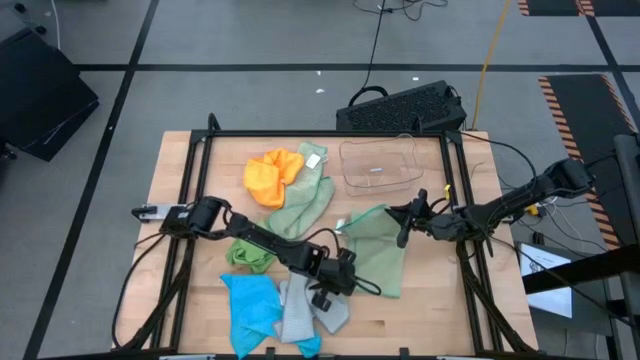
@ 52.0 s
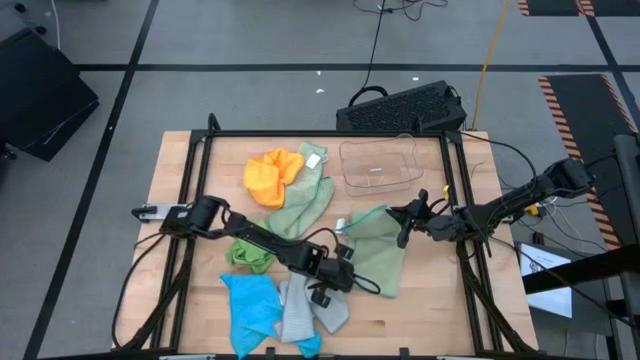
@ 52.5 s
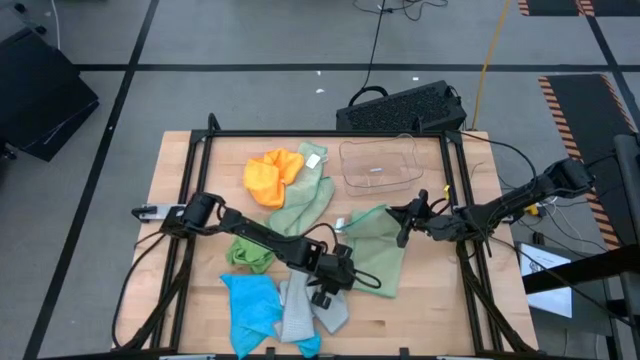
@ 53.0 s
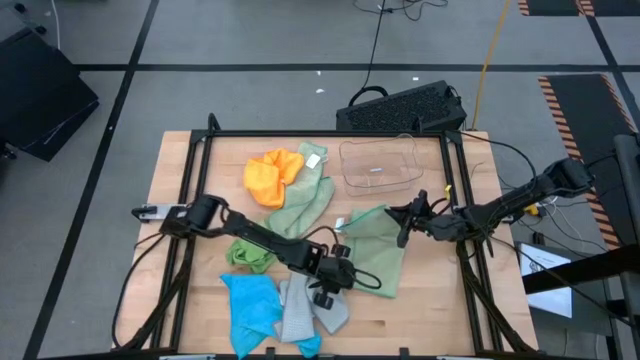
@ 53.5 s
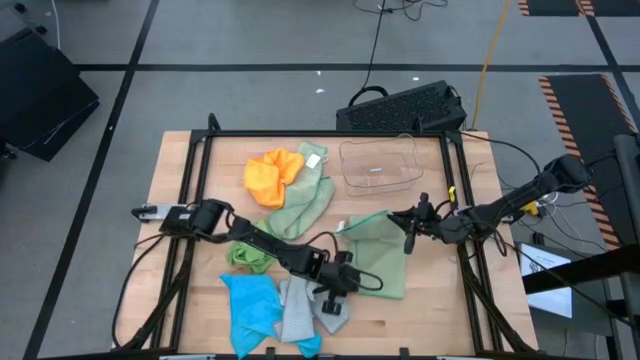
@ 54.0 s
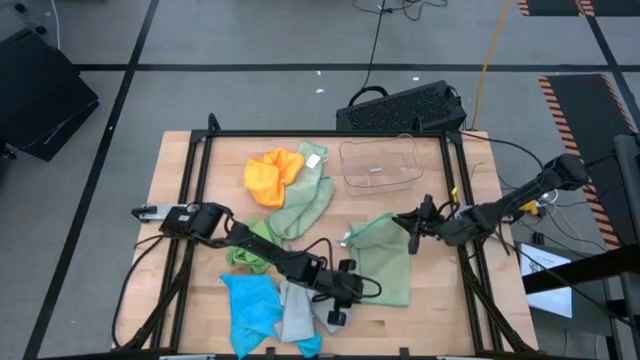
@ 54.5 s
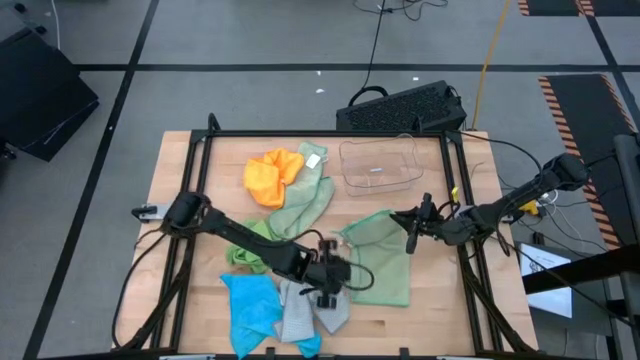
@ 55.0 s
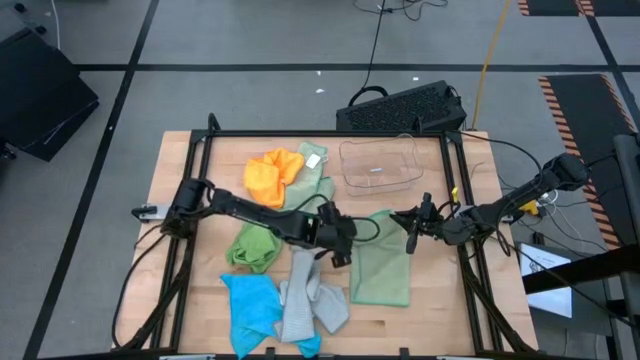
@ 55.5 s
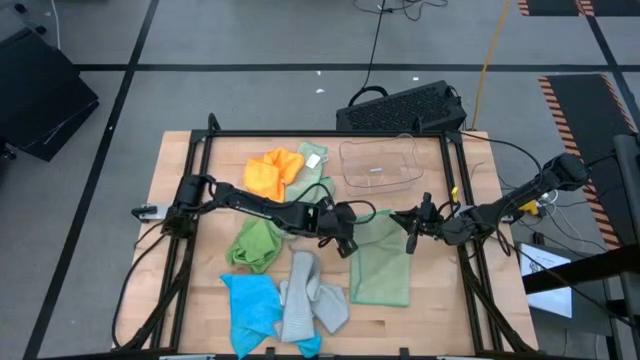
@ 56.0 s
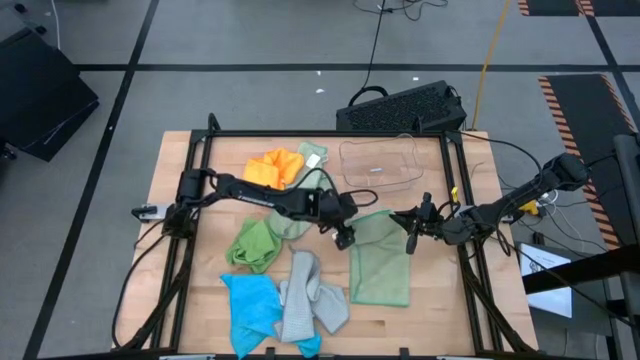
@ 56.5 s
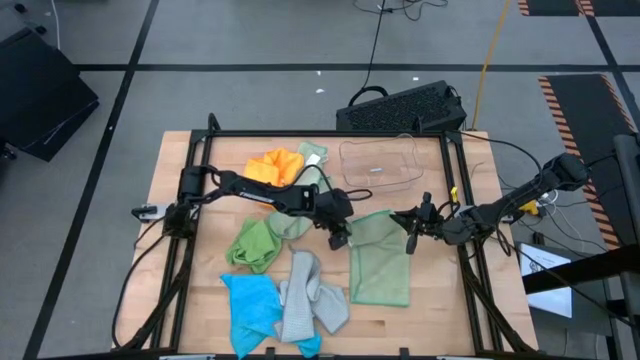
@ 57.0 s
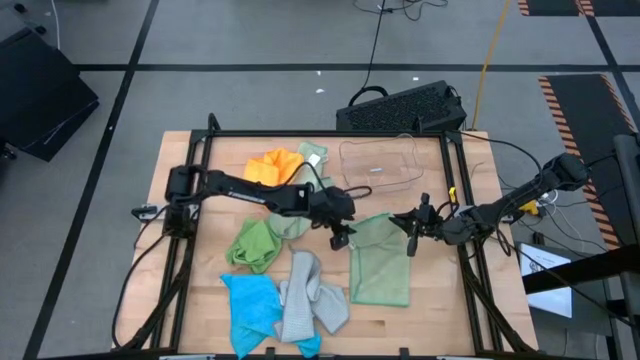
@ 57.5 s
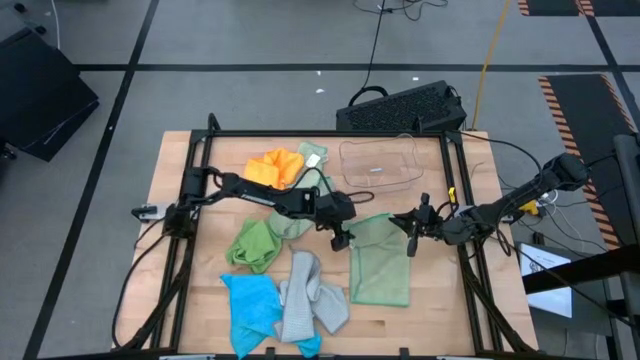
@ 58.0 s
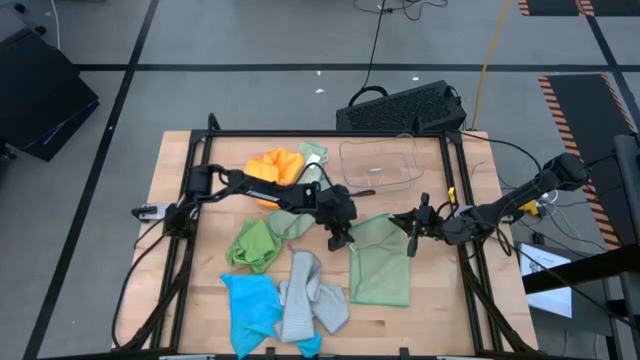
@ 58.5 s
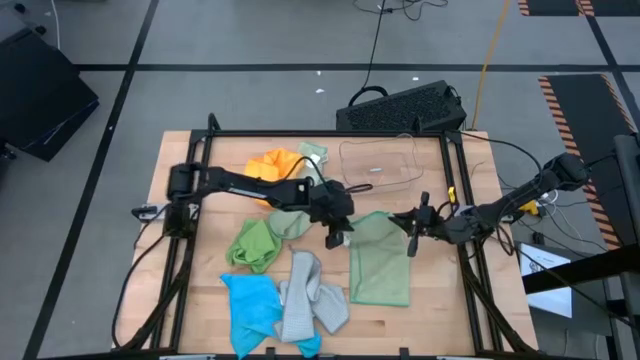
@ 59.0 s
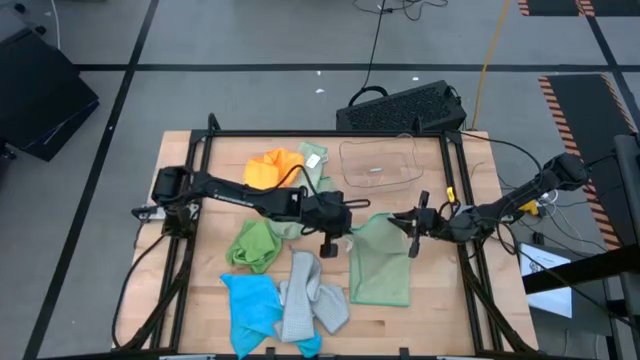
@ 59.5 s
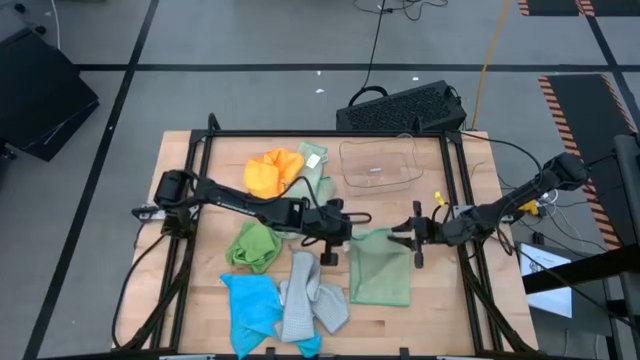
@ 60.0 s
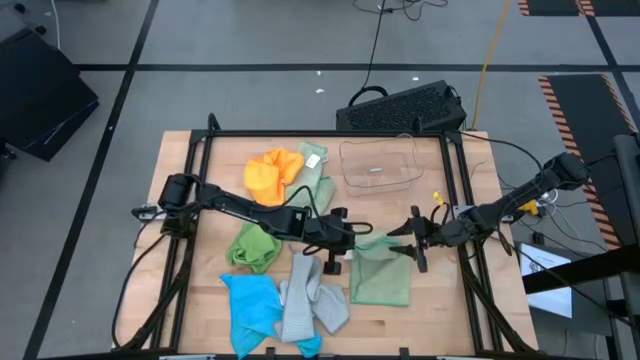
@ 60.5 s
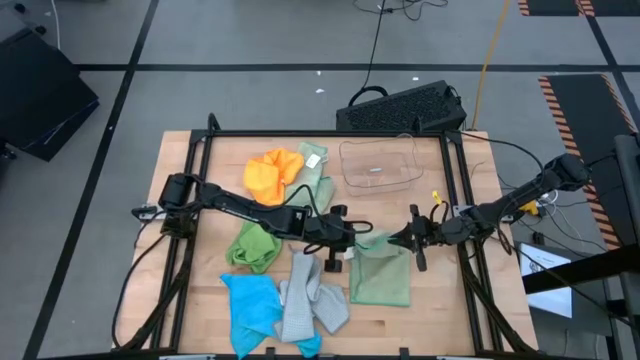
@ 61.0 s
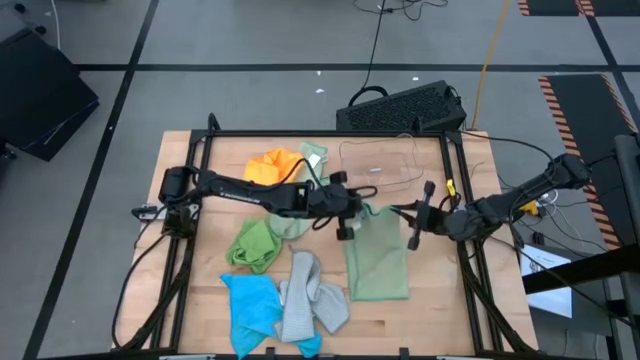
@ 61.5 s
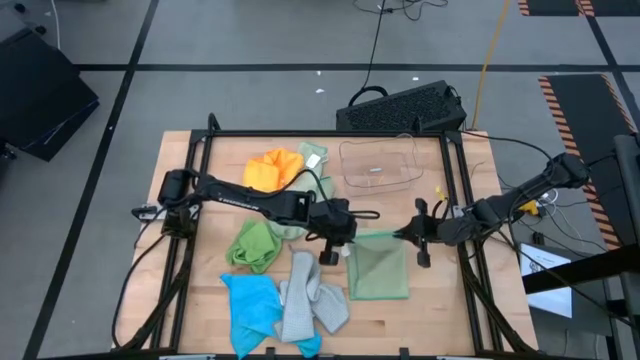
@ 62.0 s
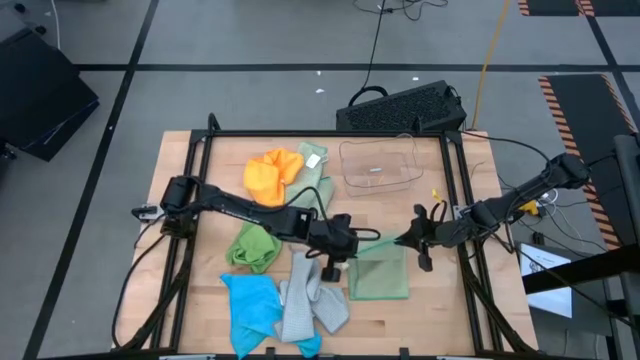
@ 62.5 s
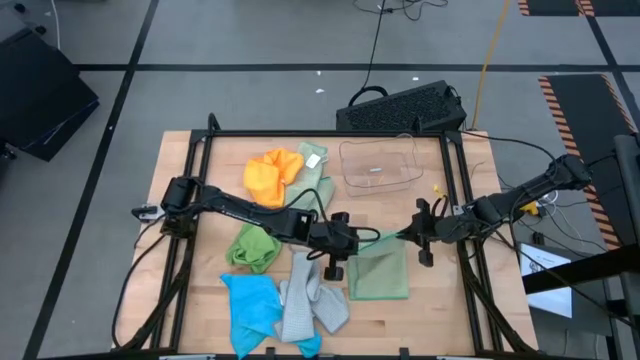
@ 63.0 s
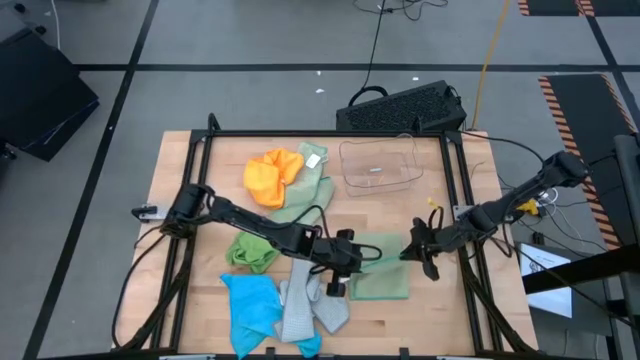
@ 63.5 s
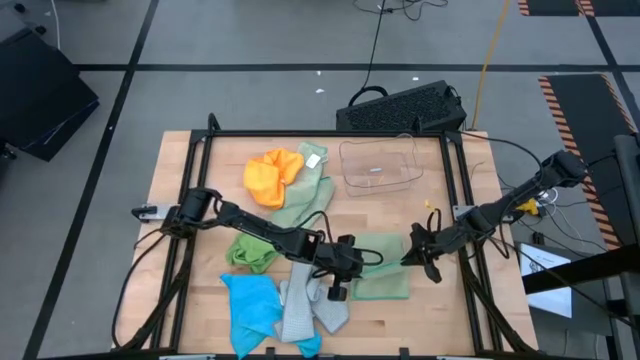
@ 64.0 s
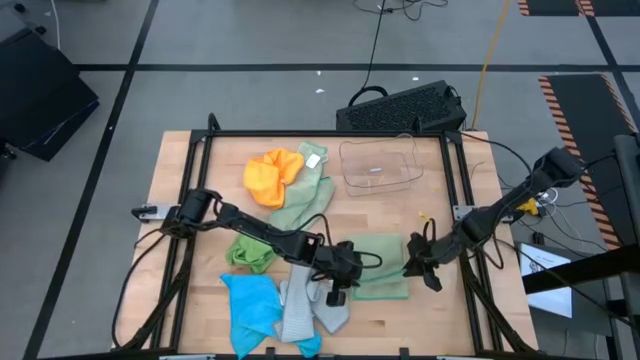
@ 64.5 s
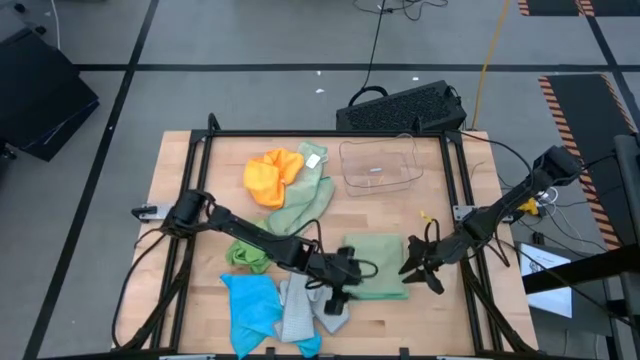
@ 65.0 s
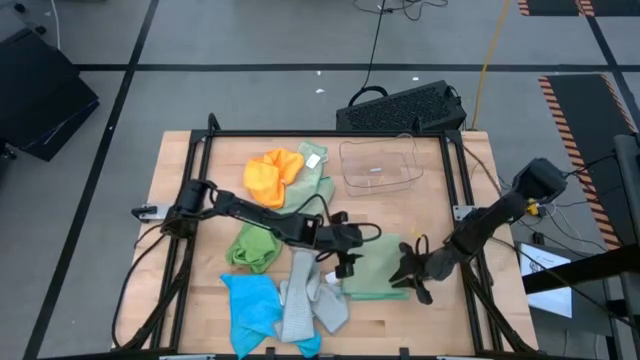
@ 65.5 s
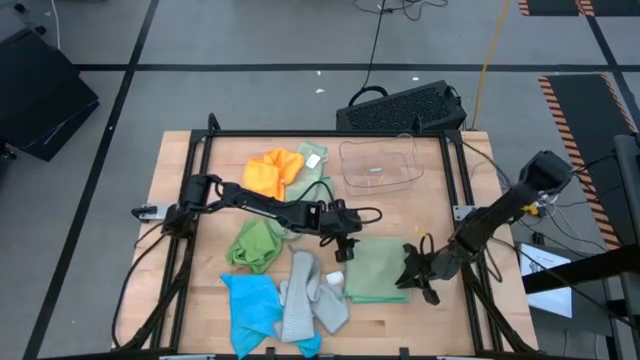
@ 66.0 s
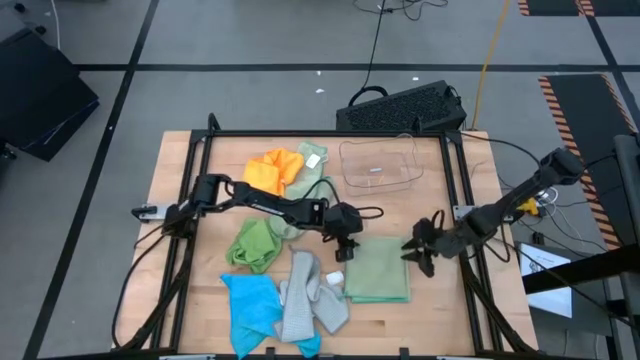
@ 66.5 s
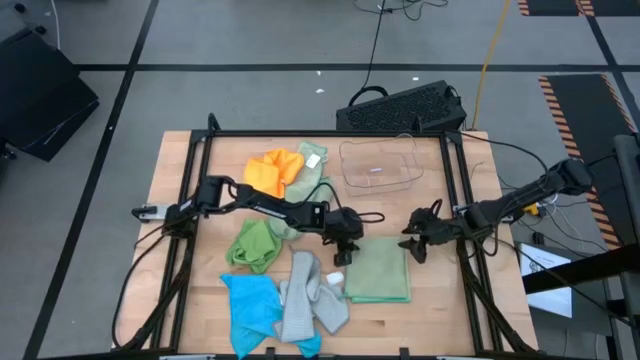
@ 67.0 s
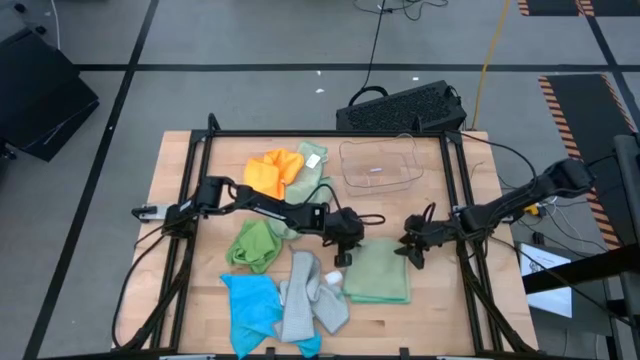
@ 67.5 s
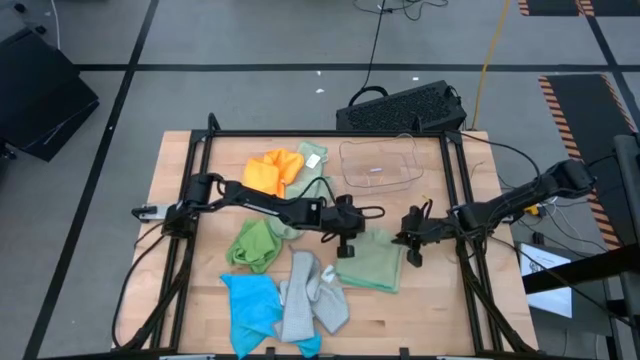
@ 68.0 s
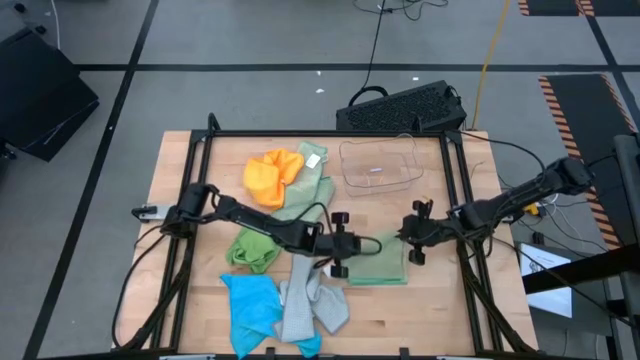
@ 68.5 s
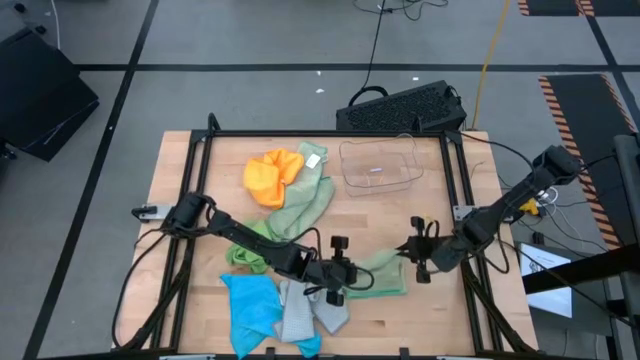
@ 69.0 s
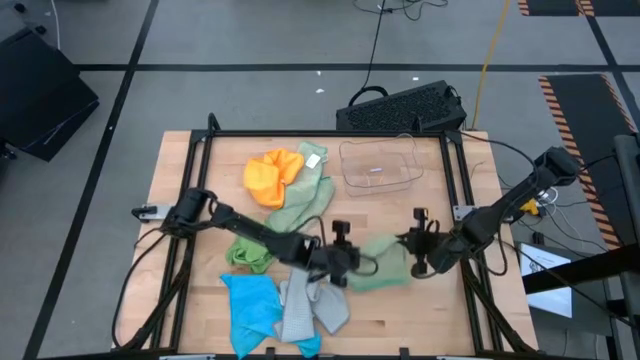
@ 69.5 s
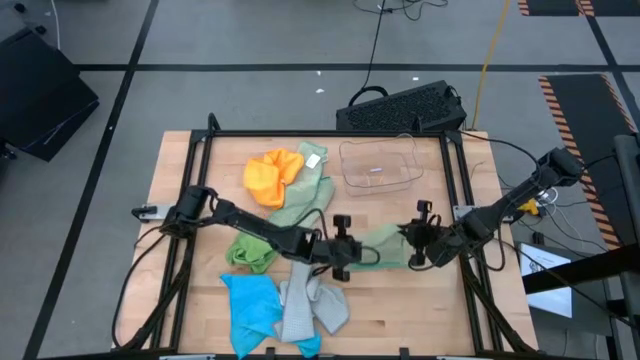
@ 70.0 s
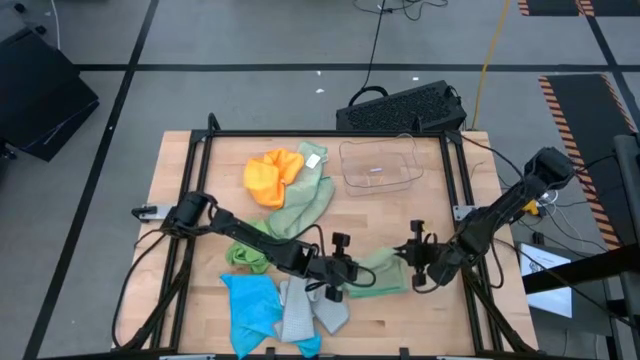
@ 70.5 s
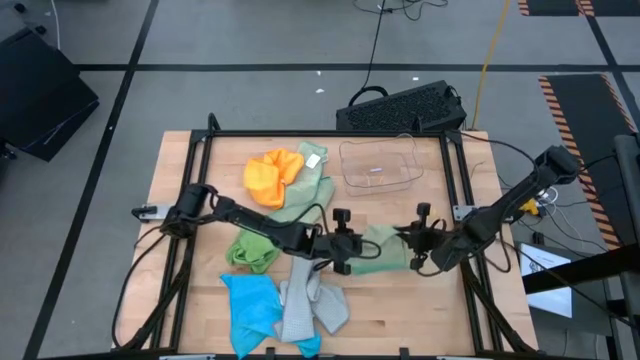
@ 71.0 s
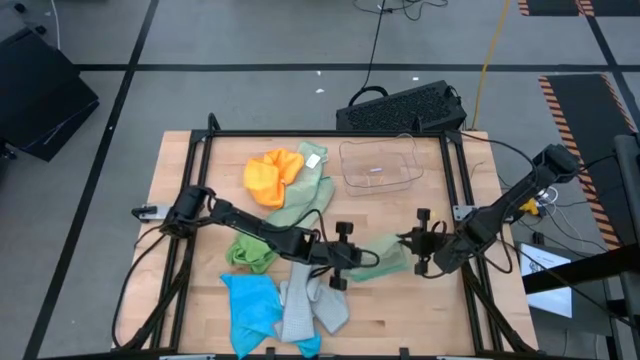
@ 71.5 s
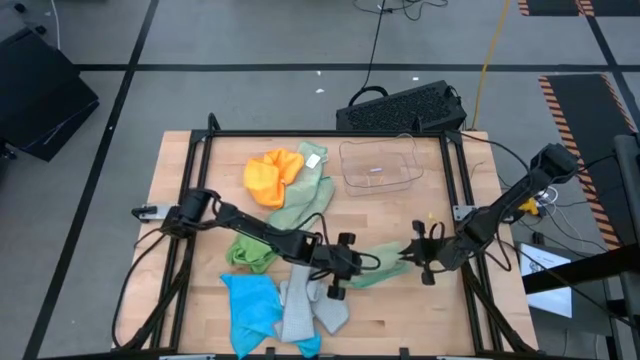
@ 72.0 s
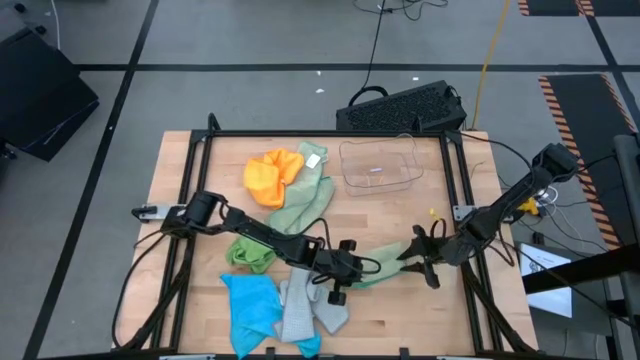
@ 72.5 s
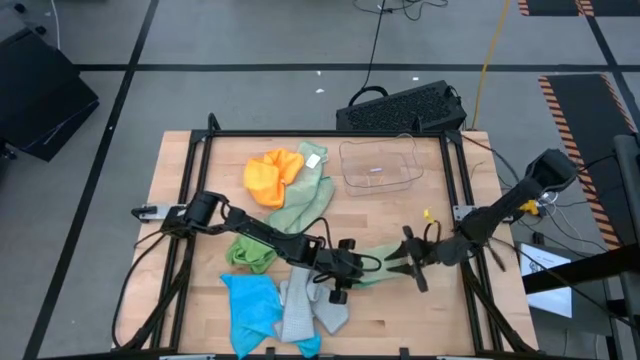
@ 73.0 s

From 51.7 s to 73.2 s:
Task: Fold microfiber towels
Fold the bottom light green microfiber towel
